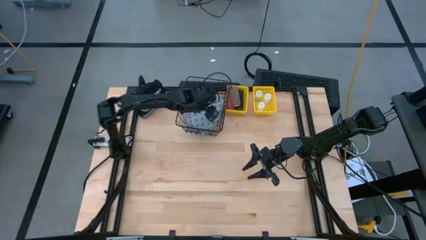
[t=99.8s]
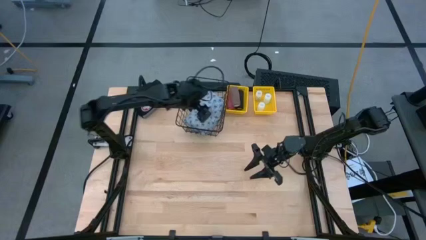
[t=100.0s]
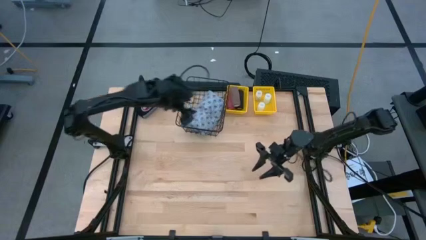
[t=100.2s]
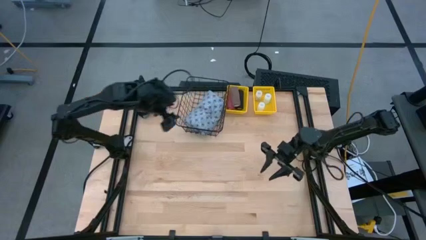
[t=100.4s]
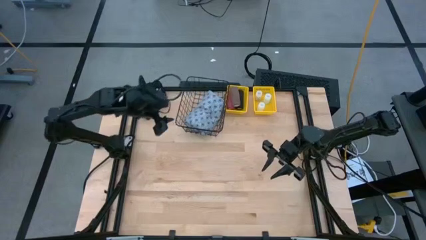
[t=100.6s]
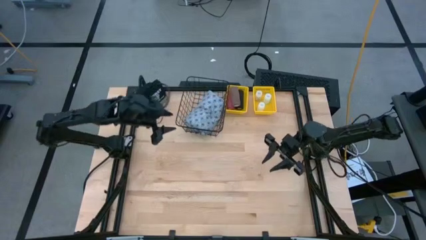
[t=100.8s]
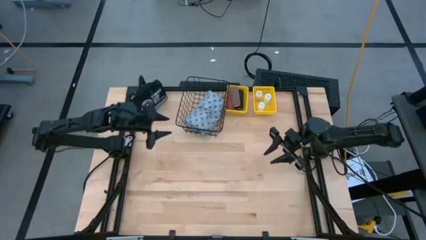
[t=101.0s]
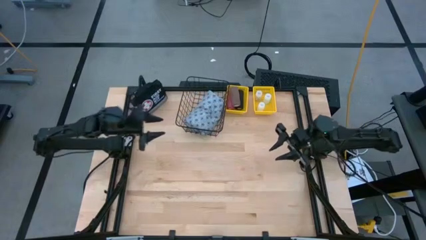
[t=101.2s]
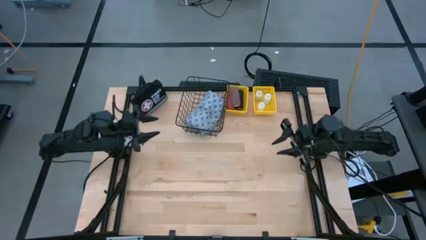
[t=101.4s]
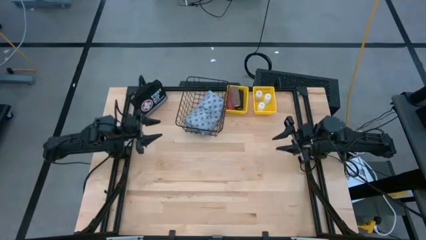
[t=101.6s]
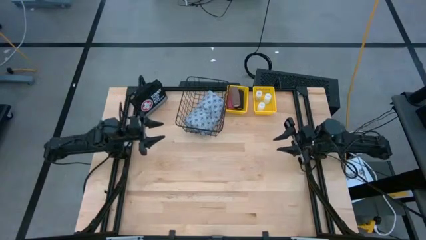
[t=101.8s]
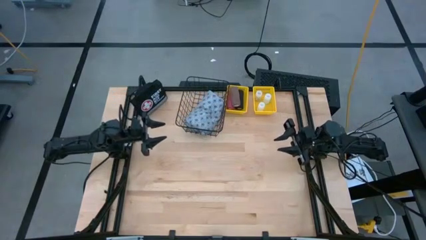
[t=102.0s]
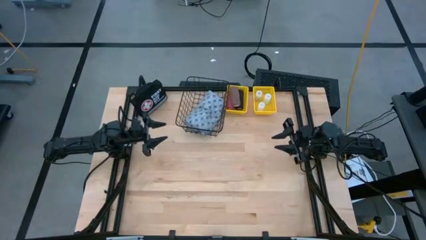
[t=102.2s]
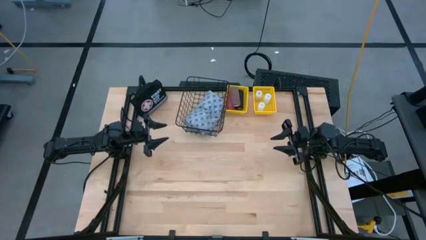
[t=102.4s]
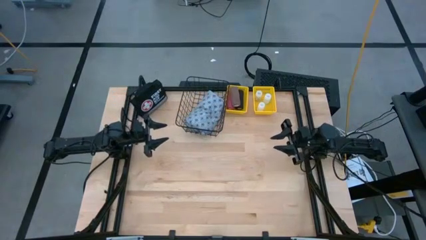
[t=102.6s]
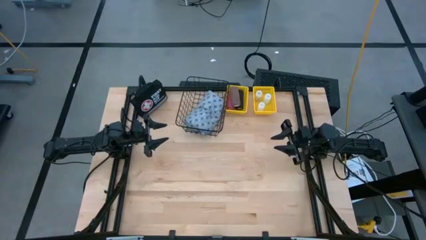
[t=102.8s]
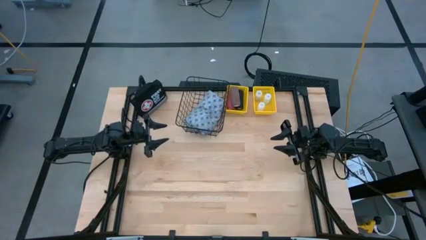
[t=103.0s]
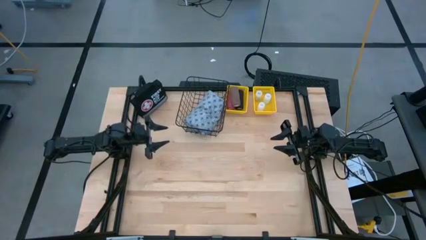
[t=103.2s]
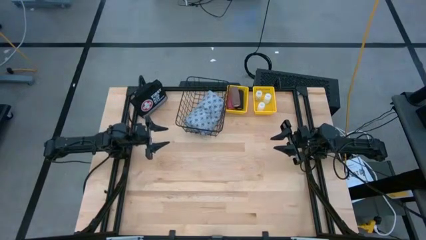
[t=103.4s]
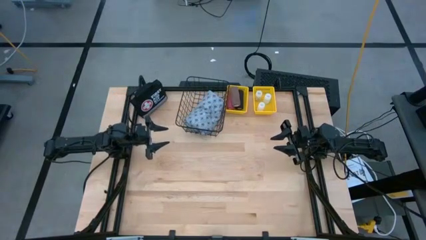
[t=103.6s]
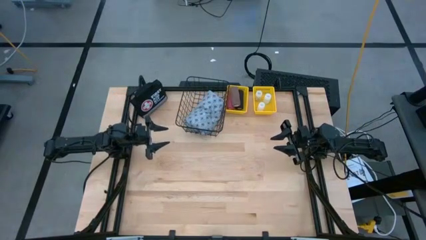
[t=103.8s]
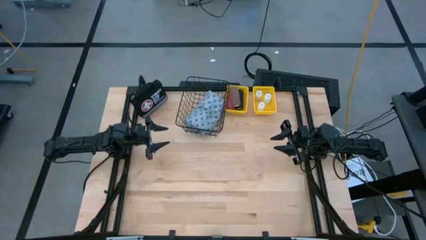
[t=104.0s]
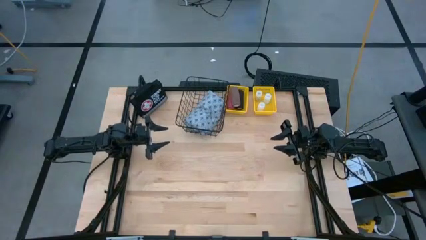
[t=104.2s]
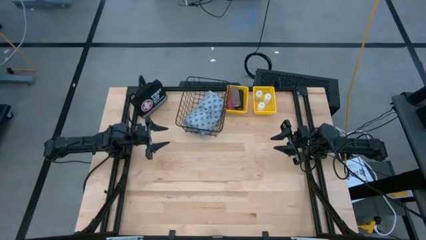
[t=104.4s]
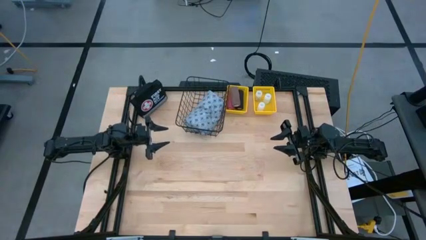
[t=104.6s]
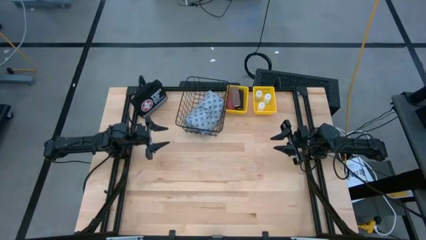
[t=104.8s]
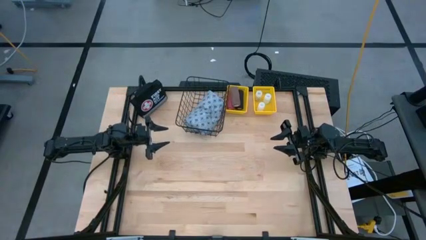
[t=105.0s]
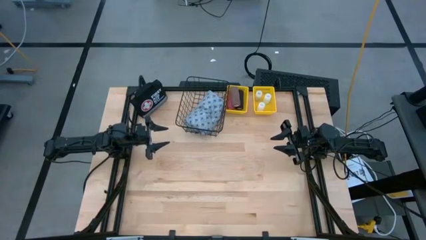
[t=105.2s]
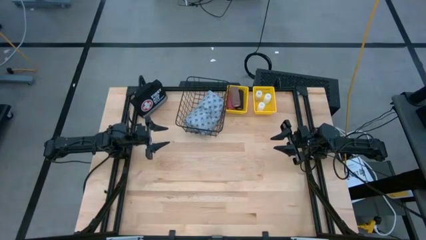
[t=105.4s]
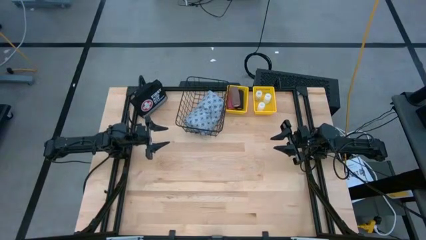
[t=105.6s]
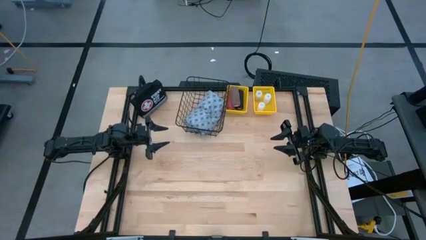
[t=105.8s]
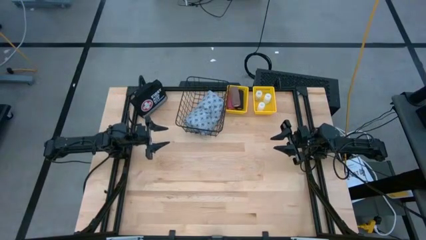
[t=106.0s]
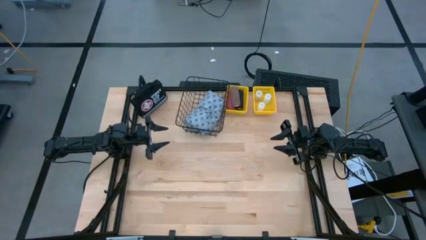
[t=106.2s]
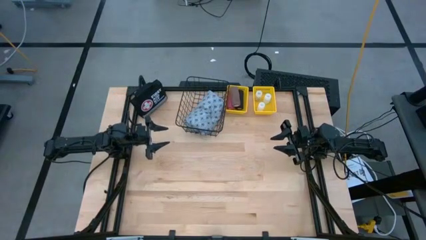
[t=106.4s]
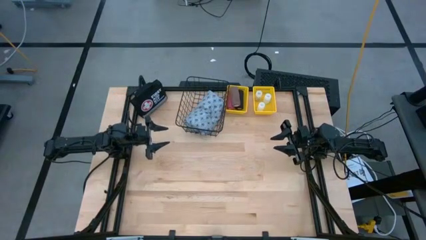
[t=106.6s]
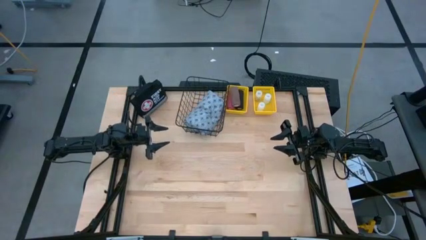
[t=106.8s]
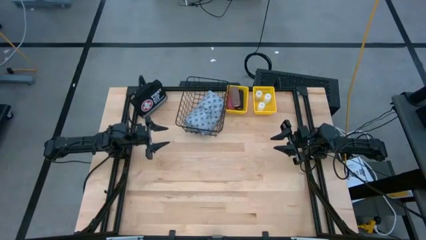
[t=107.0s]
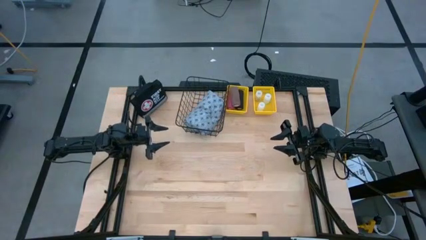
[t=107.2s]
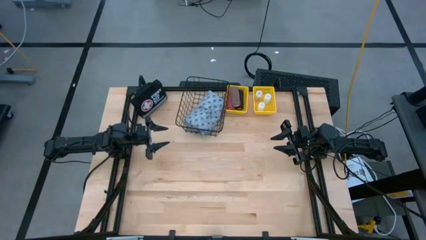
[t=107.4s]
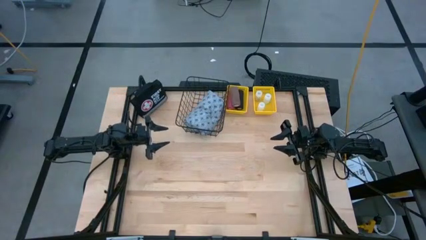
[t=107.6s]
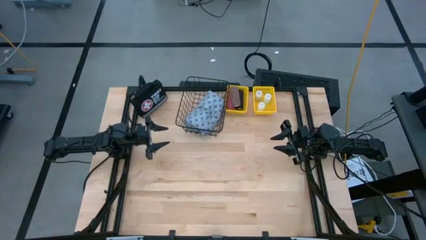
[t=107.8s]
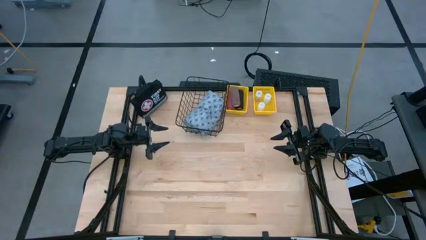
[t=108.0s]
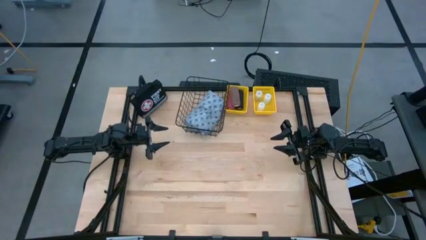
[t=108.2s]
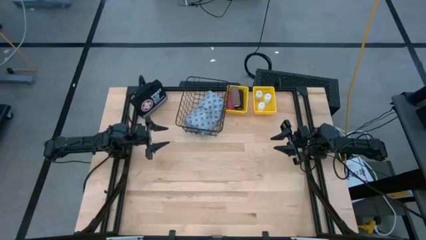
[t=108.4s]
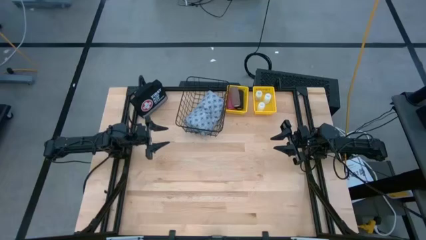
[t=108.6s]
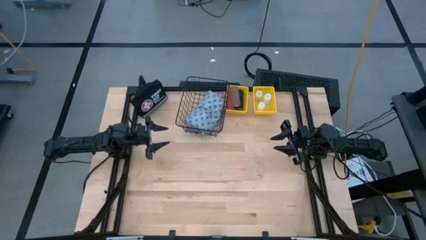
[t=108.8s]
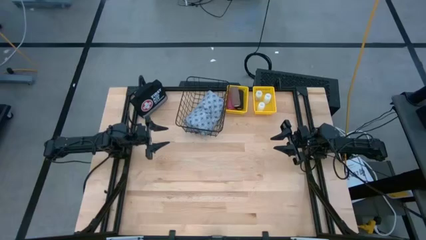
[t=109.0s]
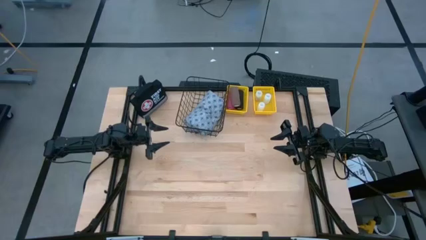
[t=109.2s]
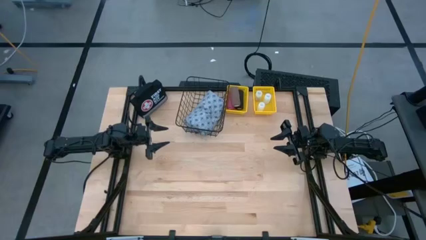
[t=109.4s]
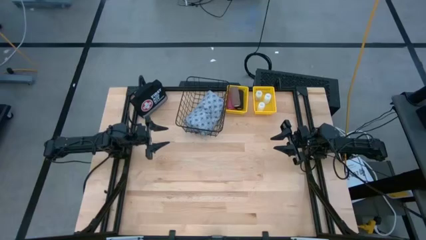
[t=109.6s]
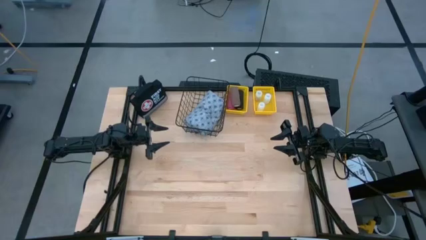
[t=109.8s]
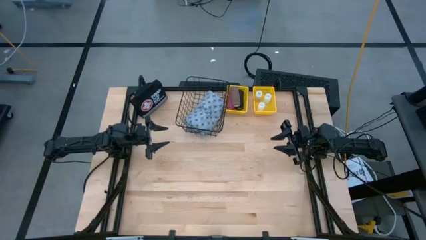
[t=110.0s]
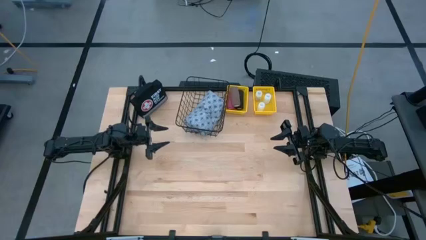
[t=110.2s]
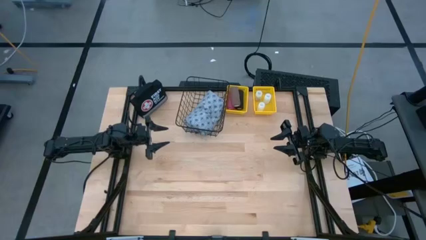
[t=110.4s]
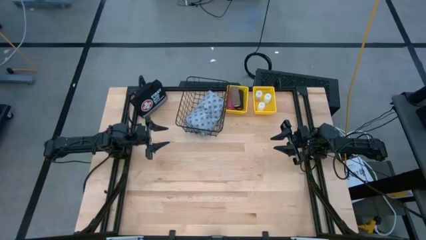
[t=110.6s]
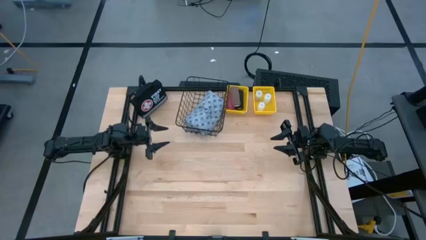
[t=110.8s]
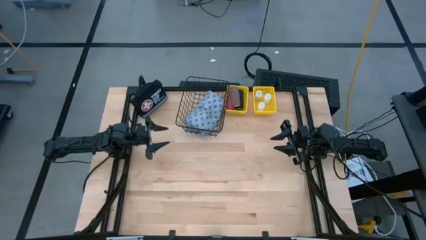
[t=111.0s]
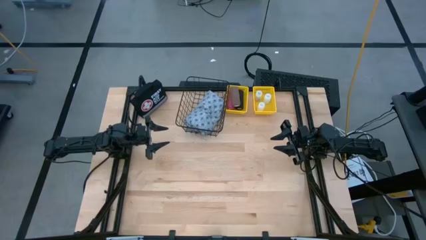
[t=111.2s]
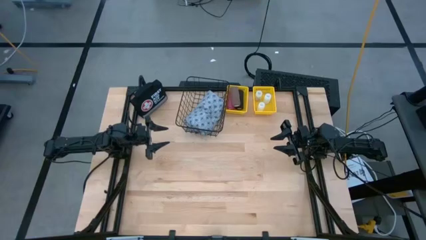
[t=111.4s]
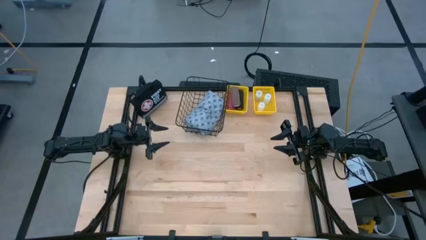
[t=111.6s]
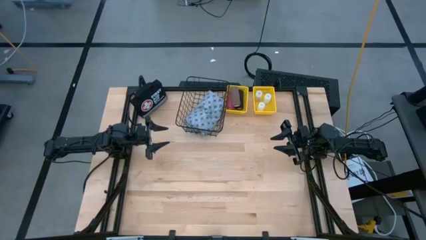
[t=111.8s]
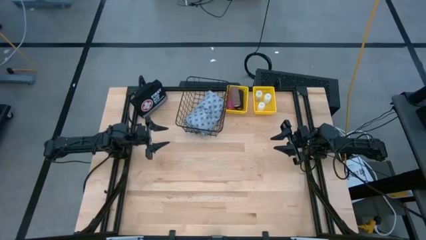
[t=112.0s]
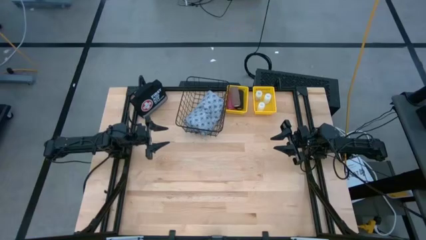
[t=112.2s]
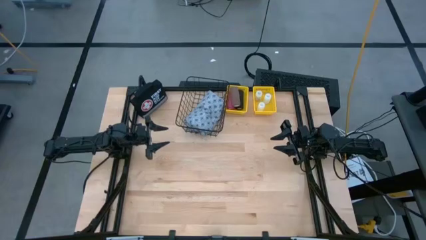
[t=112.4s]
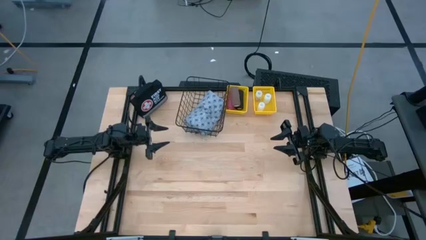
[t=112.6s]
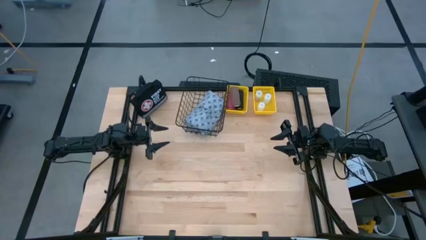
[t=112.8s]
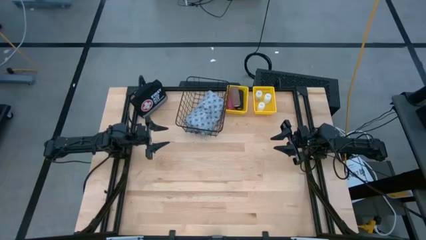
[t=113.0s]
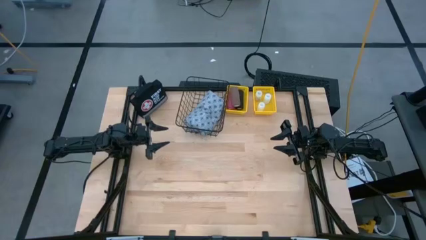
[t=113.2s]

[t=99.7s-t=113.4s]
Task: Pick & Place Medicine items
Return to Home Position
